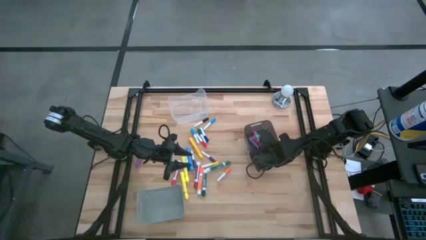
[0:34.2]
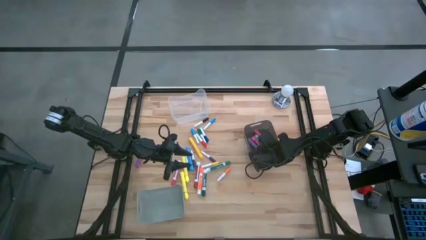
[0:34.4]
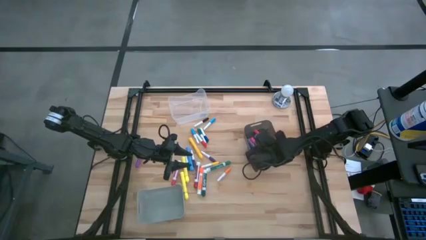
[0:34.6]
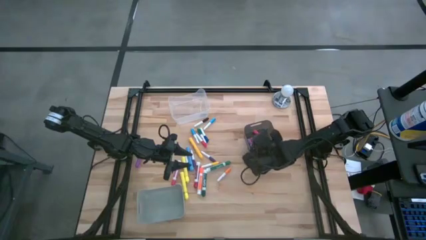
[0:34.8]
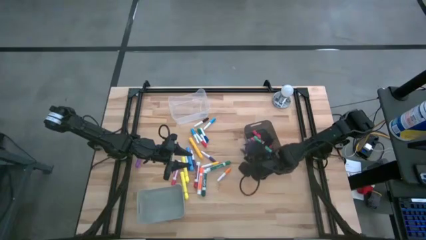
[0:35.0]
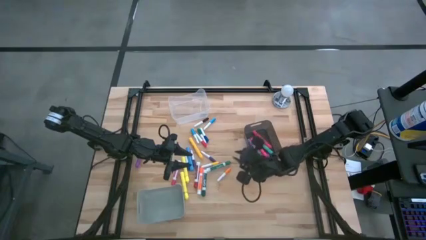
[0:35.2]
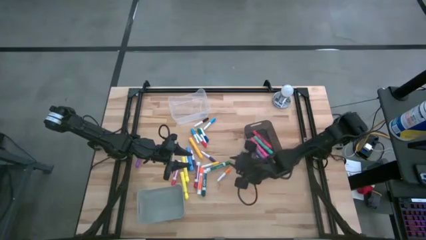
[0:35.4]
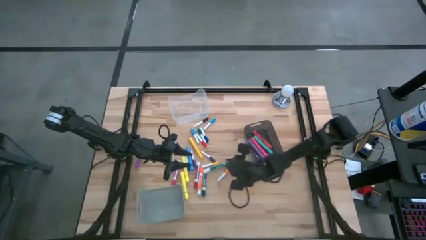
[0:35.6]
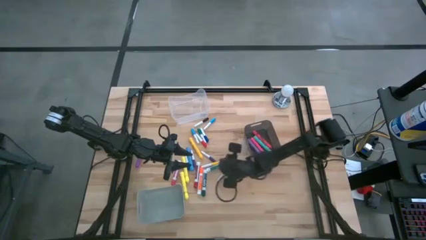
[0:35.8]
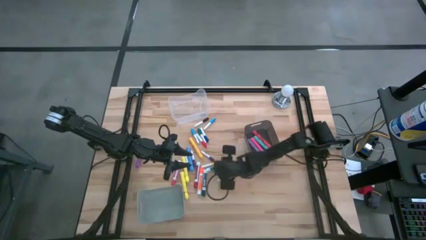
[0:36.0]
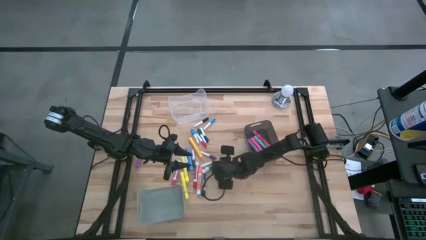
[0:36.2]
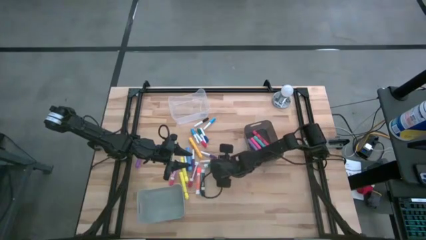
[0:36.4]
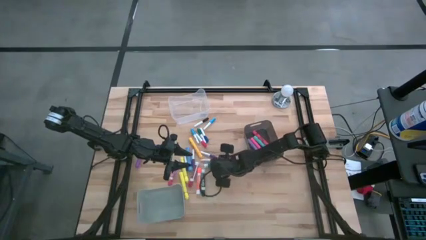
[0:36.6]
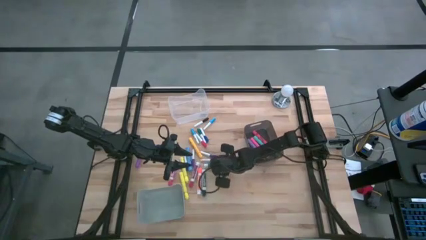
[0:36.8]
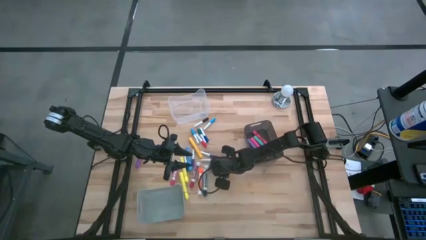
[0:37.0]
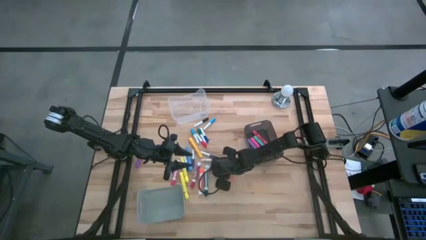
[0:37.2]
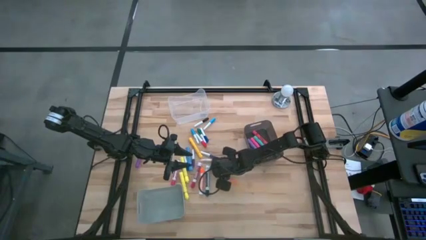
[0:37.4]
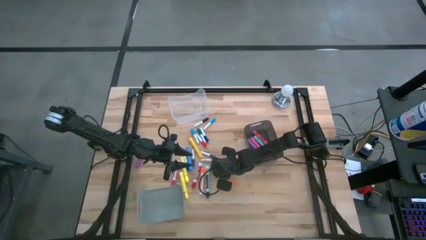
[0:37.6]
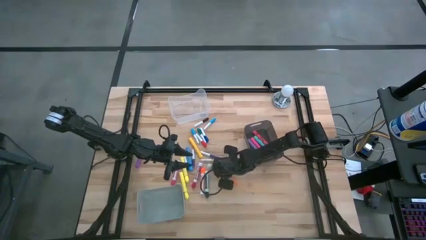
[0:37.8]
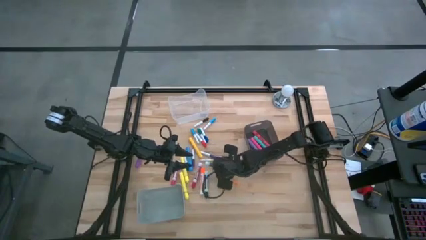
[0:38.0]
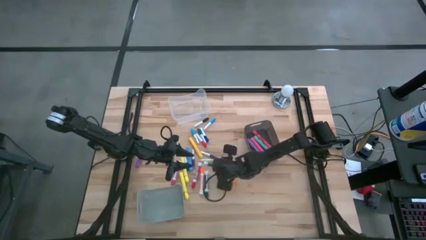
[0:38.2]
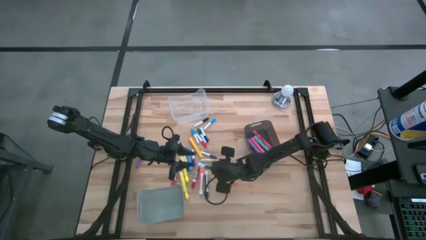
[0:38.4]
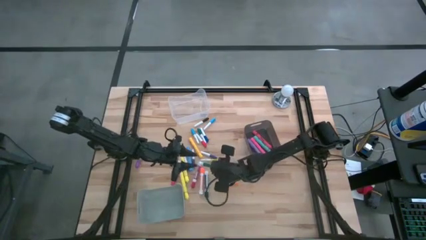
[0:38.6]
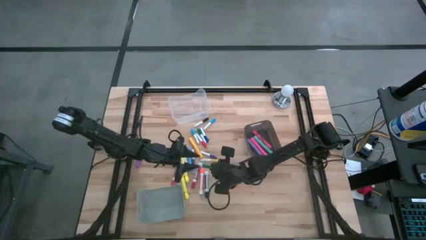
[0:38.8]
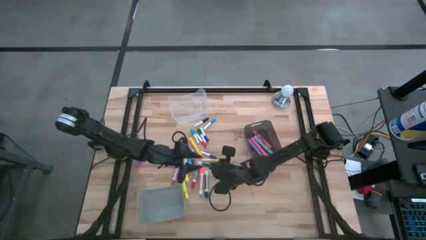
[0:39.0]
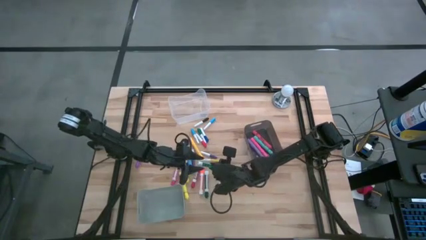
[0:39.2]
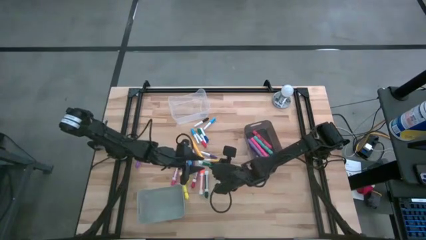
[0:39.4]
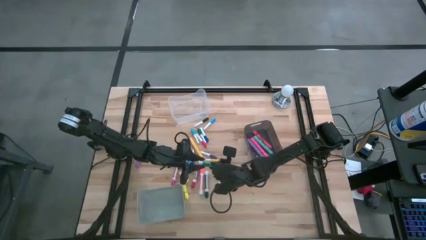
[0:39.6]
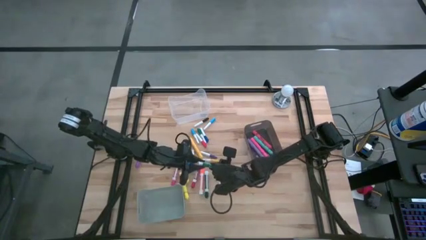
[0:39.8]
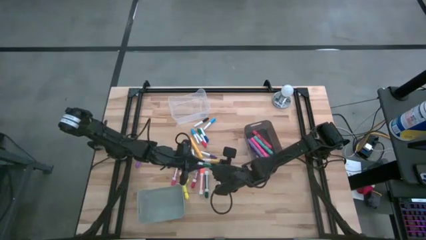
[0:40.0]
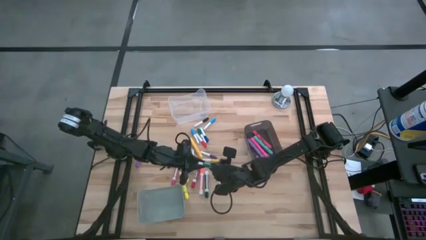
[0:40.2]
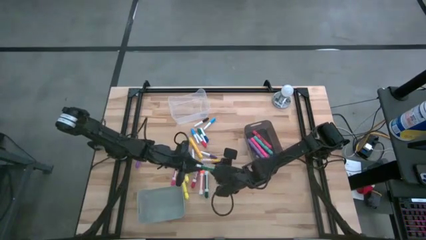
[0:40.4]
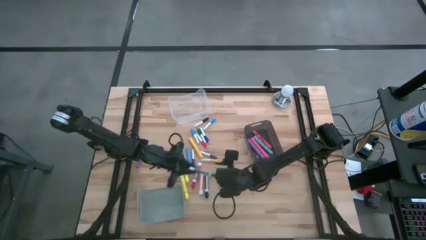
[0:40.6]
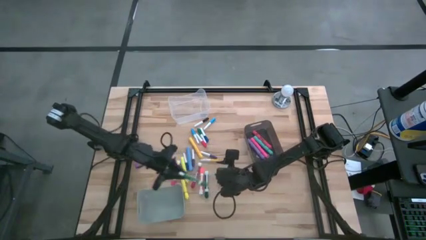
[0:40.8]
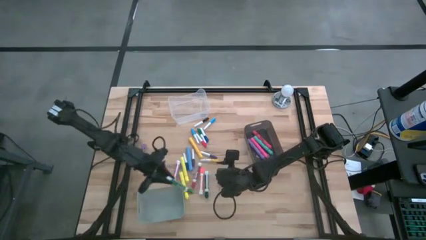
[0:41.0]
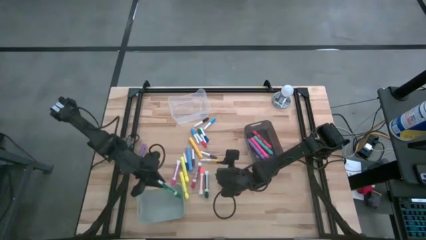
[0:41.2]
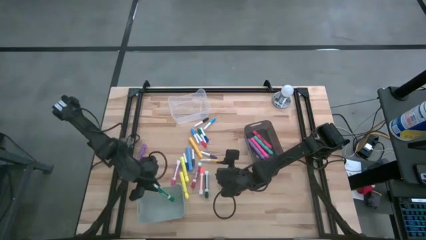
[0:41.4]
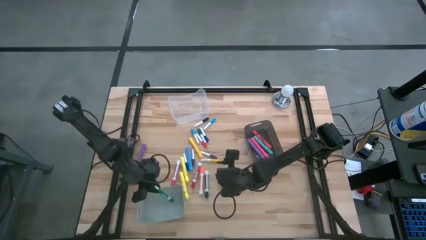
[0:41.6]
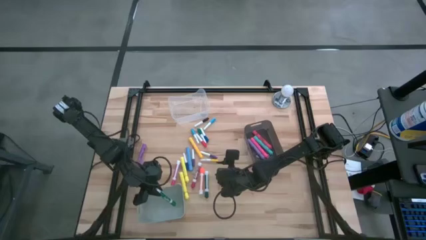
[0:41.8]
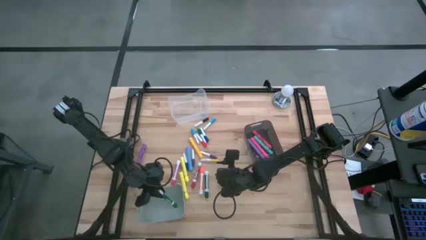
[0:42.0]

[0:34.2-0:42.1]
Task: Pick & Place Markers
Put the top green marker pen into the gray bin

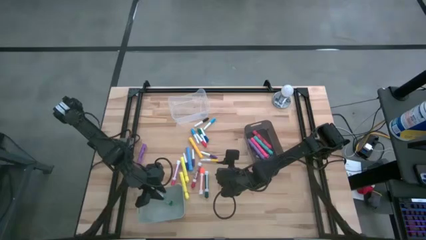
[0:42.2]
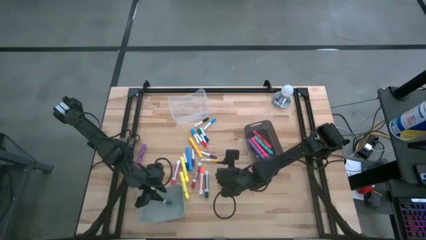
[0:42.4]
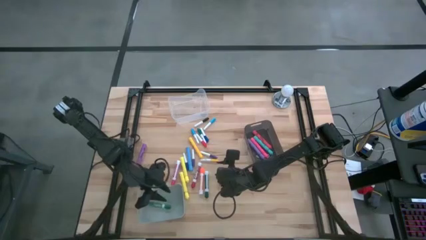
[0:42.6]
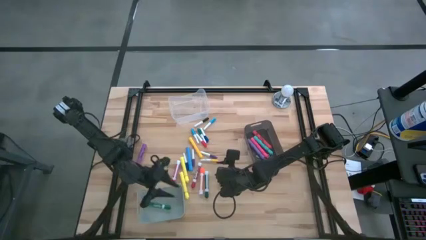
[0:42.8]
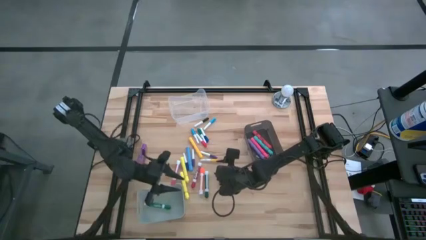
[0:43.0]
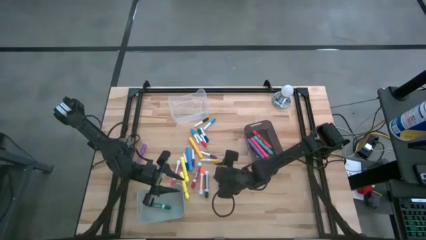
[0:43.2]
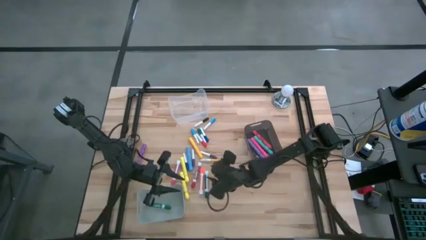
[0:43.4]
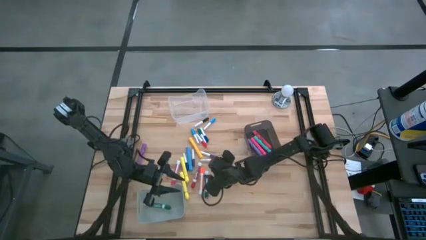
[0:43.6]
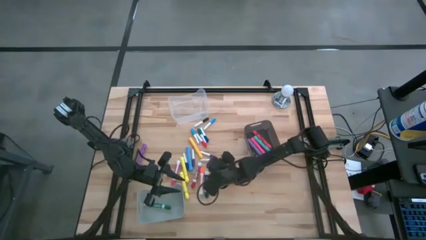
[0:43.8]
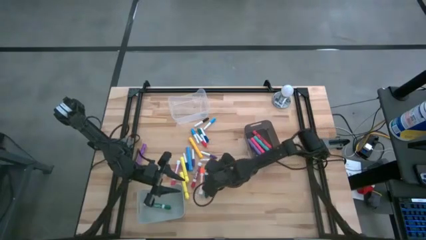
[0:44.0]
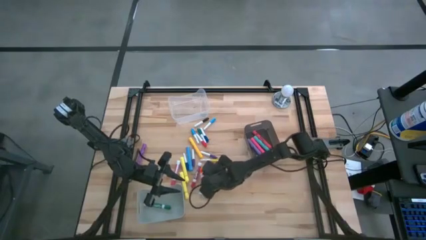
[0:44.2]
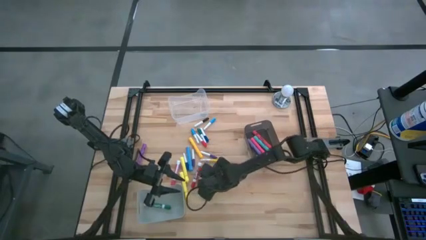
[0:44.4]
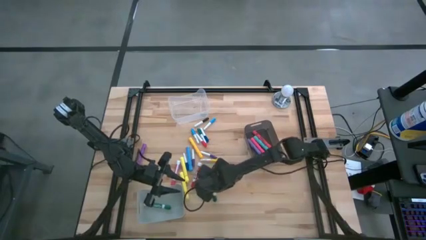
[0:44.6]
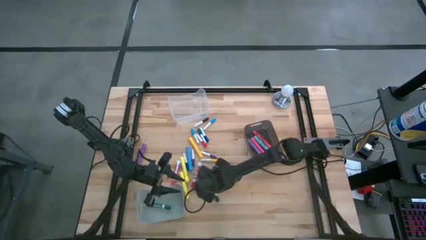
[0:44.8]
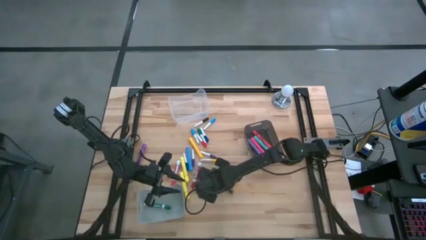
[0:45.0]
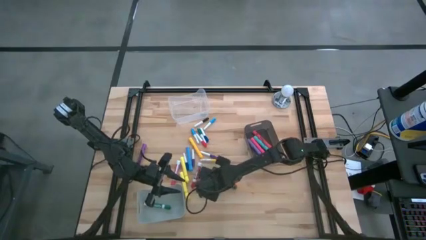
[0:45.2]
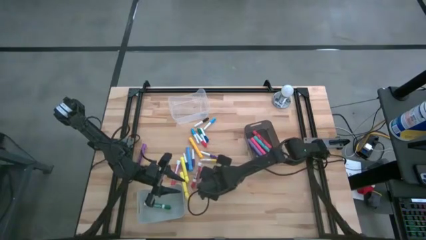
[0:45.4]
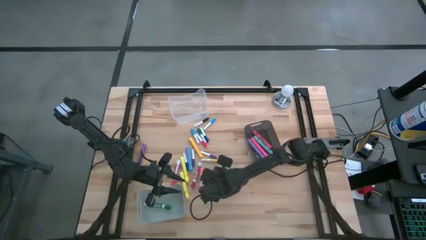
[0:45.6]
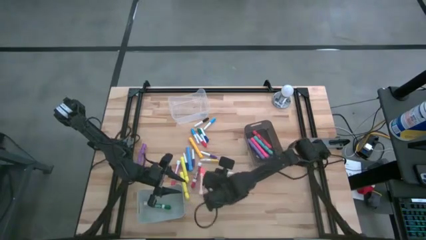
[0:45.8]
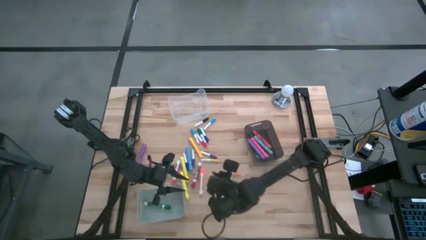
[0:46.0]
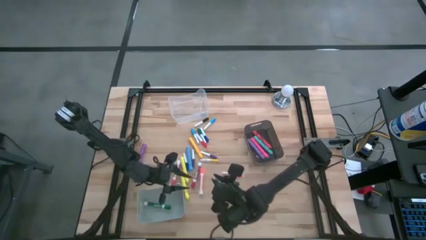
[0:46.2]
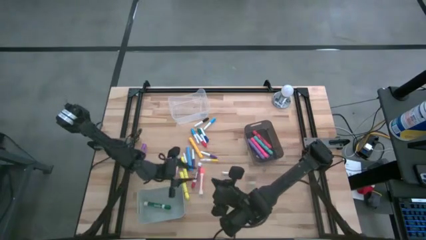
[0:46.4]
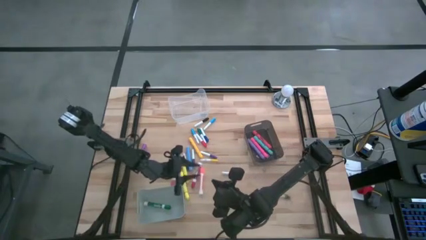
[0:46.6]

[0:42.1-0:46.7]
Put the green marker pen into the gray bin

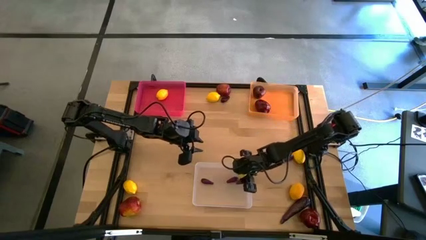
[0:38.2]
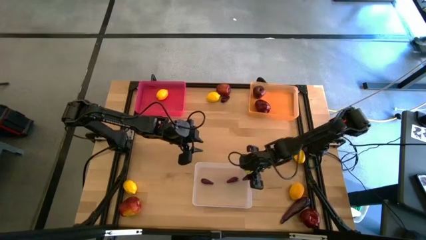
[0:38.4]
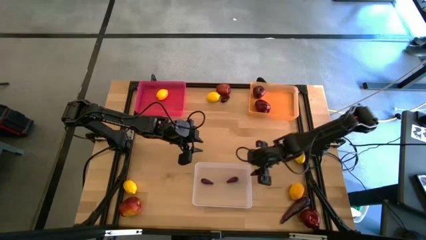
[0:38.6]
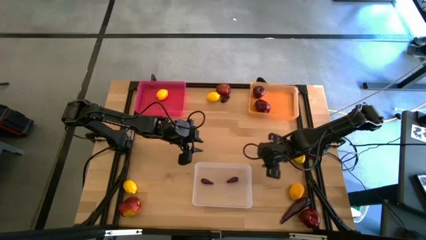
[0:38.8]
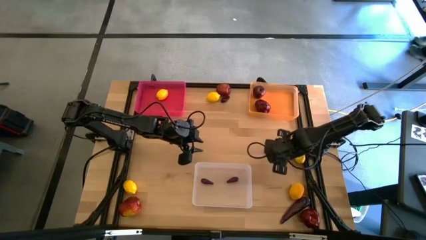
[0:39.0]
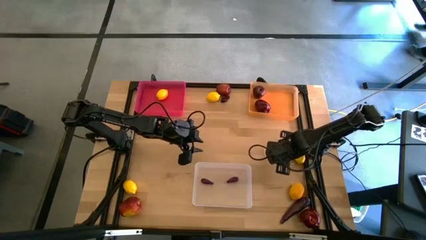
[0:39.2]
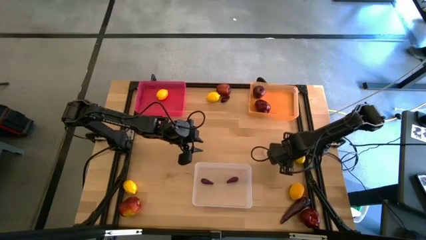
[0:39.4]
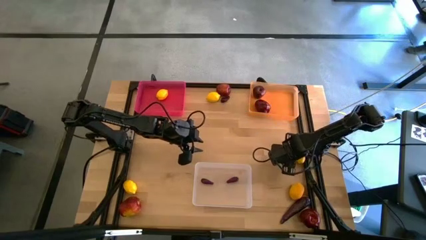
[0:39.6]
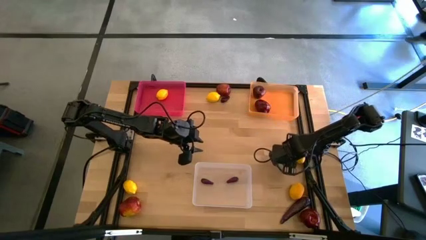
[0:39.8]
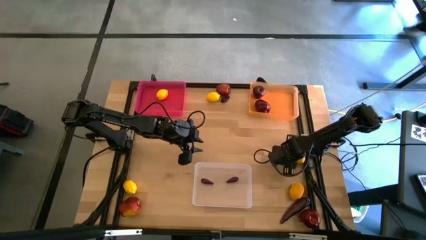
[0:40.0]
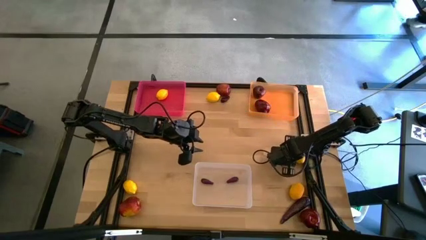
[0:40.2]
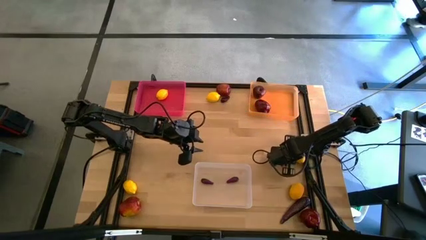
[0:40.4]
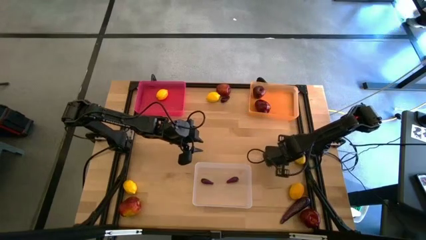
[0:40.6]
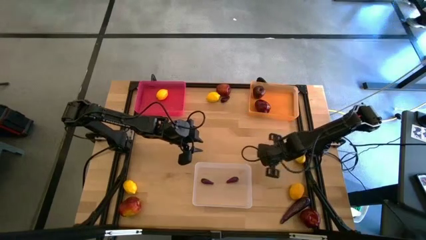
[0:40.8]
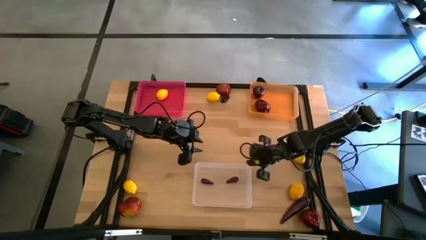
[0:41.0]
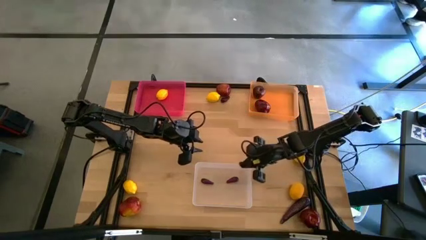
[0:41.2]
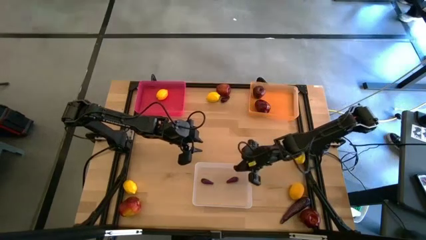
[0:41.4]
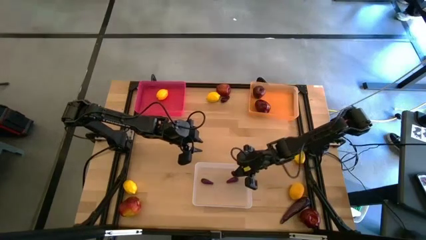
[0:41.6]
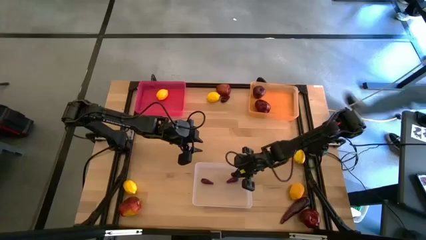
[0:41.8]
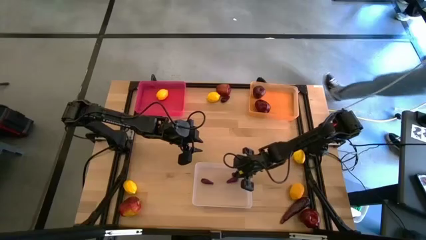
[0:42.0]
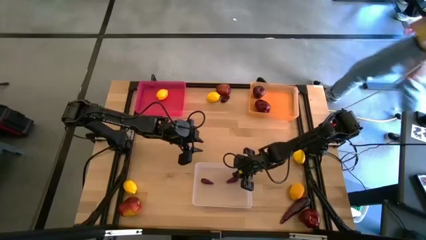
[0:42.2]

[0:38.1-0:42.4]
Task: Sort produce into baskets
Put the eggplant into the transparent bin
